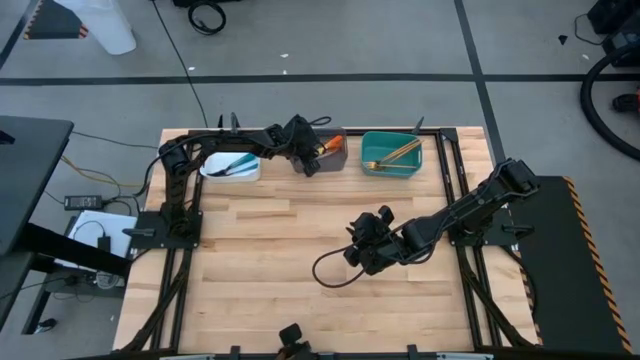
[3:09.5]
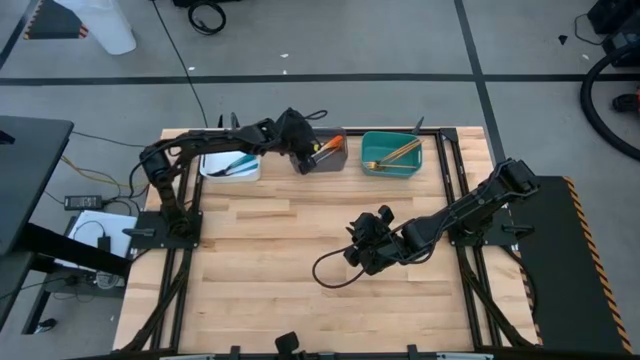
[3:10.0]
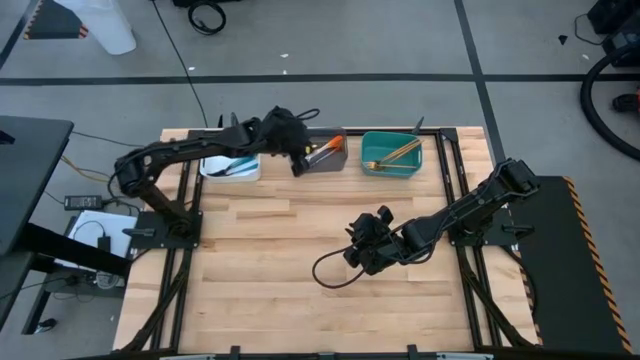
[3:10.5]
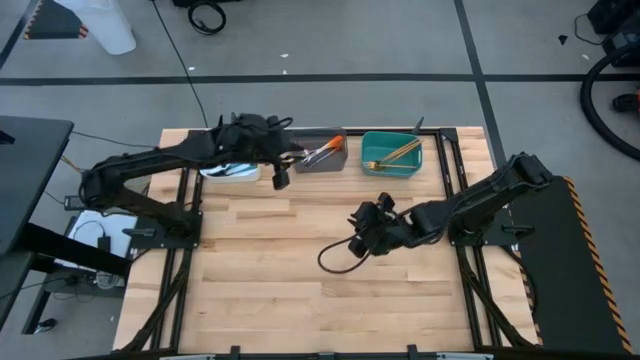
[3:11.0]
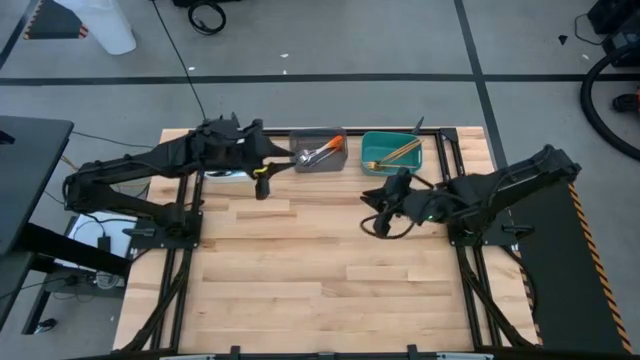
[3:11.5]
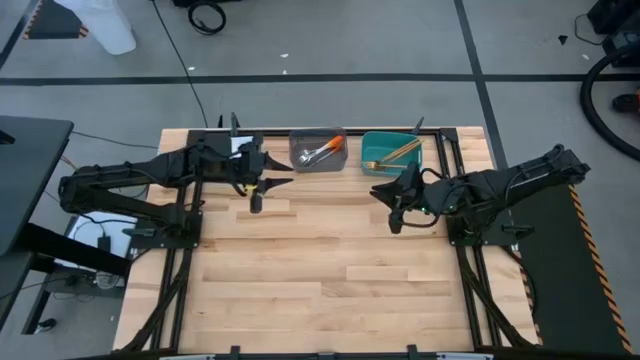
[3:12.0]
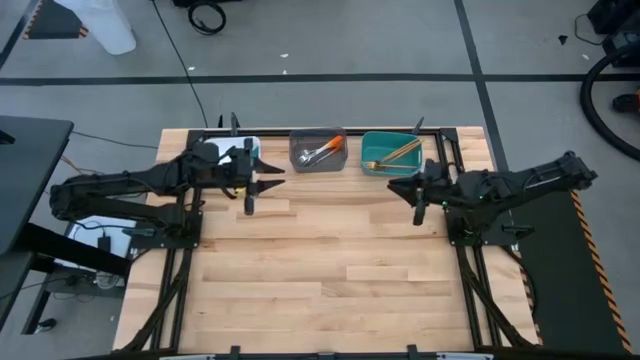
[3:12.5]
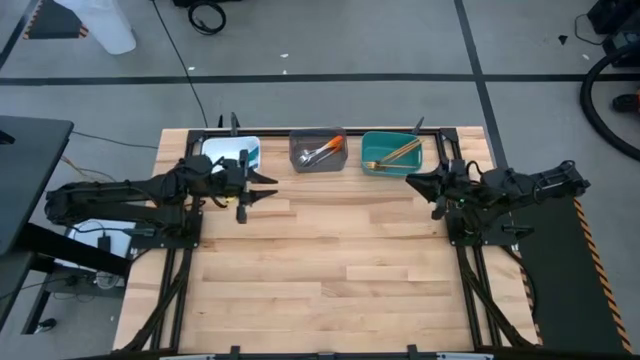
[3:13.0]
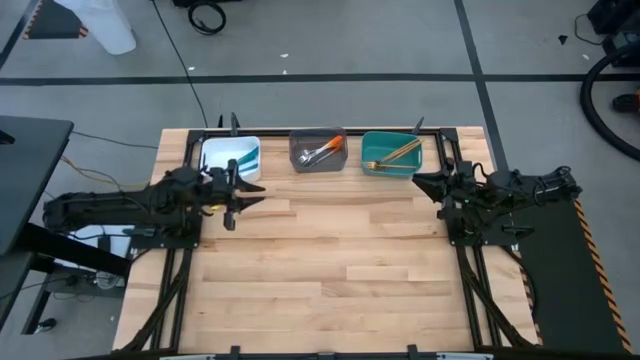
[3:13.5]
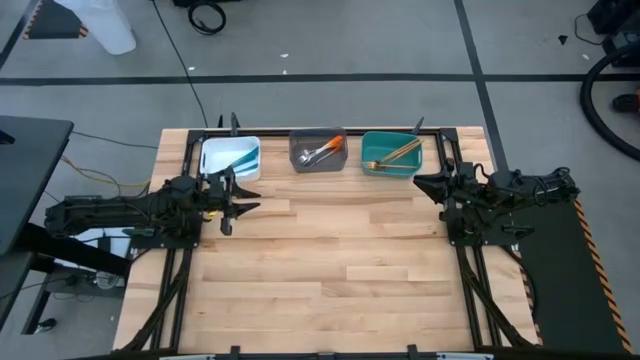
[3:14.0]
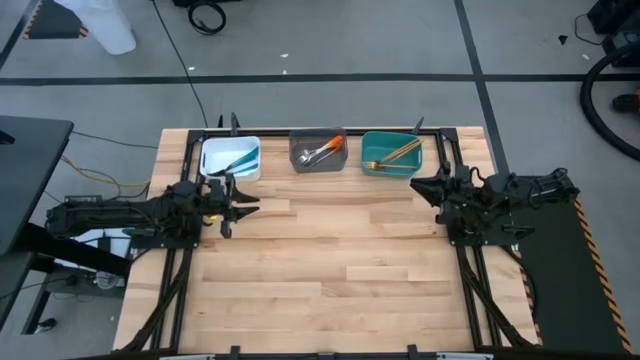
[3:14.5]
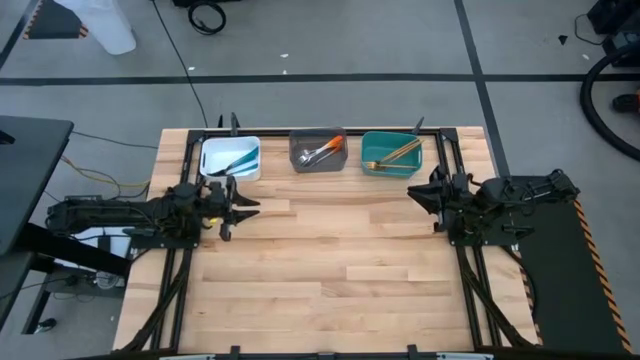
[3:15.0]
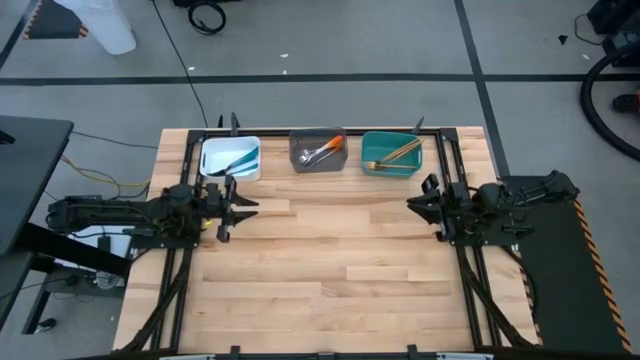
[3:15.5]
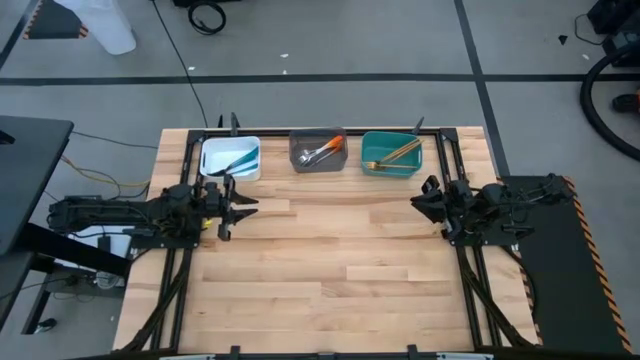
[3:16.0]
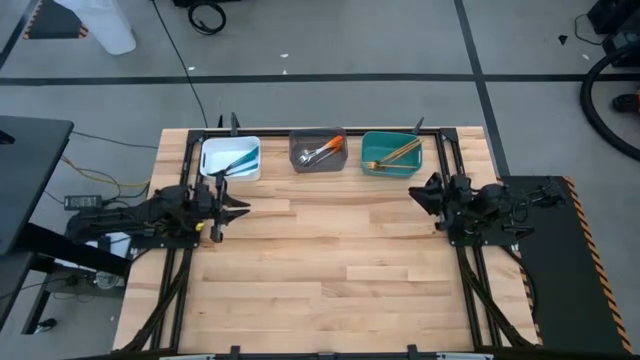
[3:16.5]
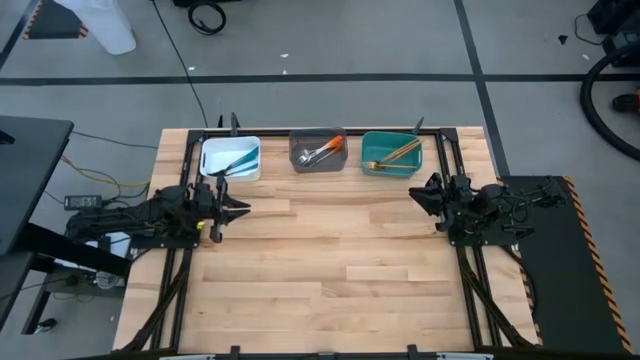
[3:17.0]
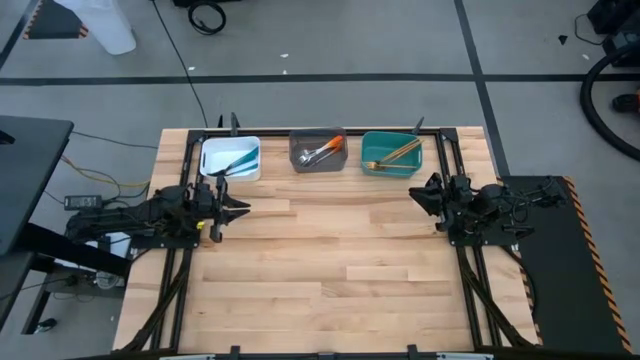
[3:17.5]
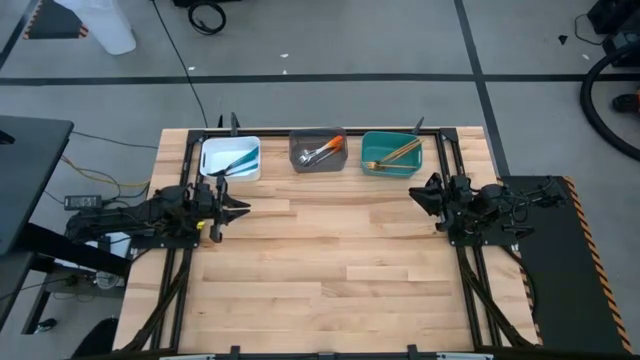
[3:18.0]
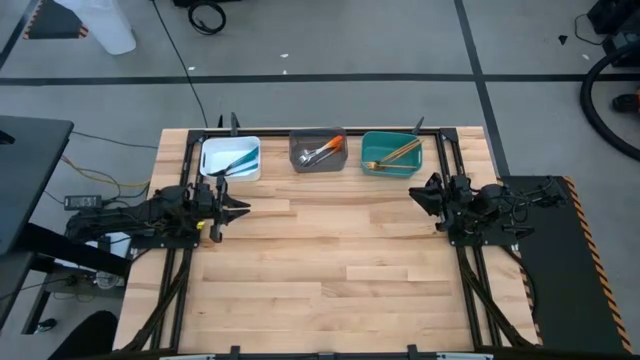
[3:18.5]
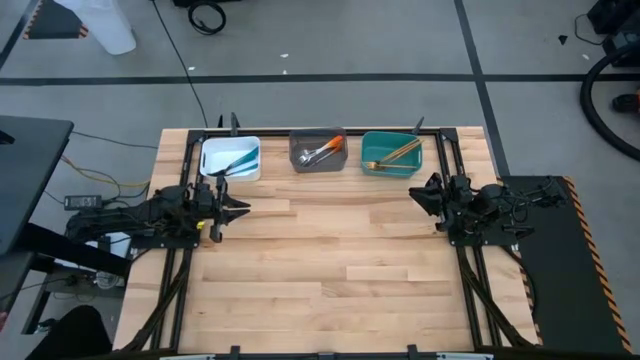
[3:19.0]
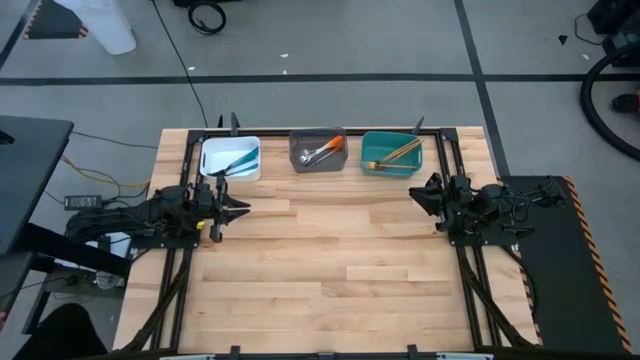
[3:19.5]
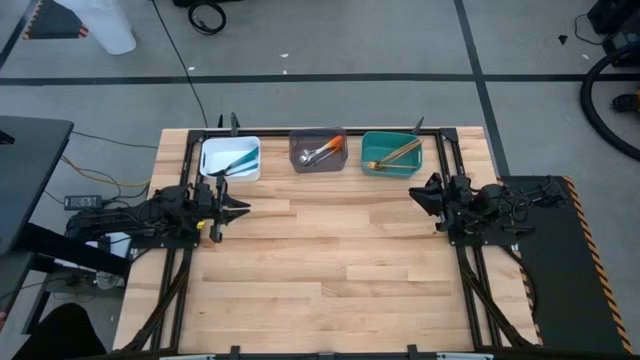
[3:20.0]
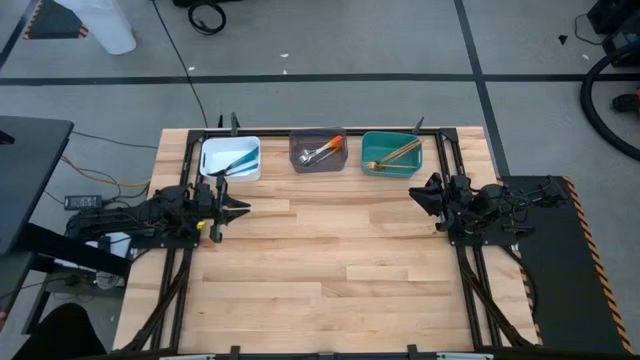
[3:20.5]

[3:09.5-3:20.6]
Task: Sort silverware by color (type)
Return to Home Position

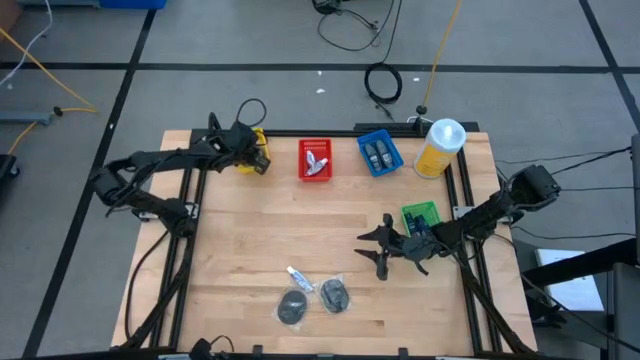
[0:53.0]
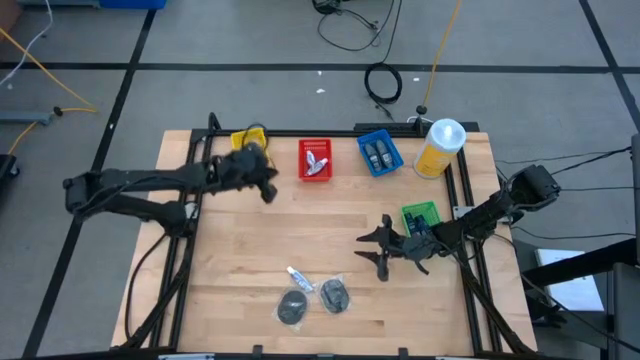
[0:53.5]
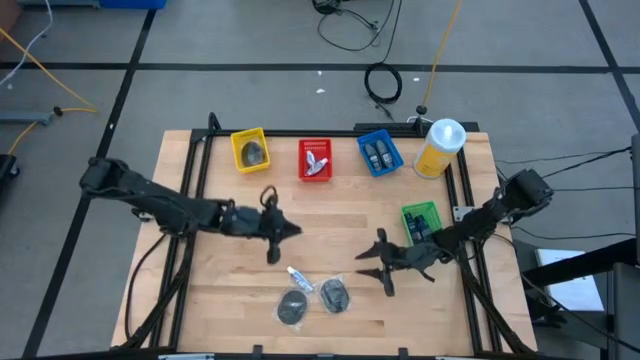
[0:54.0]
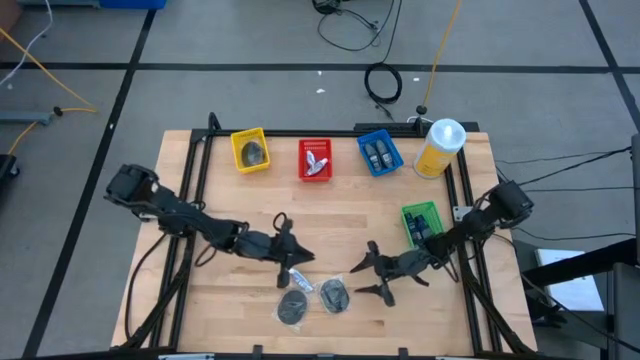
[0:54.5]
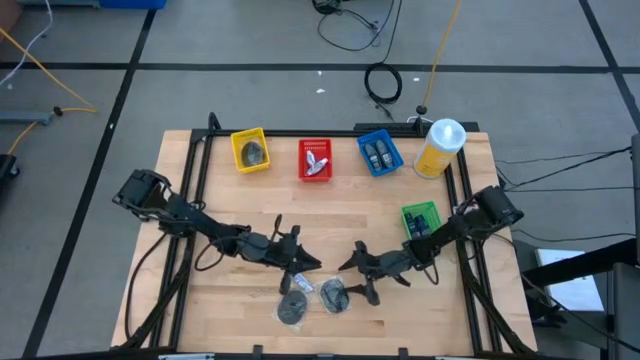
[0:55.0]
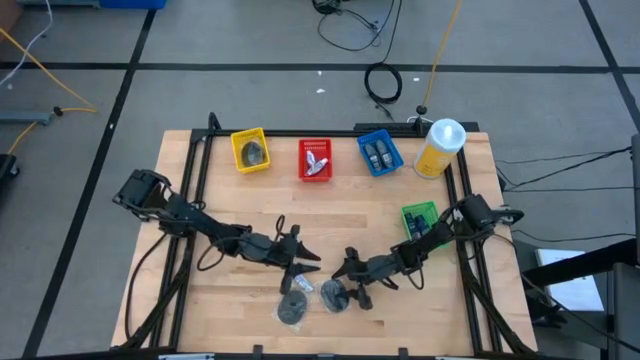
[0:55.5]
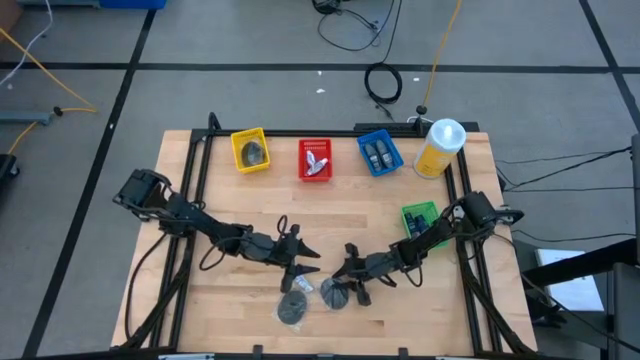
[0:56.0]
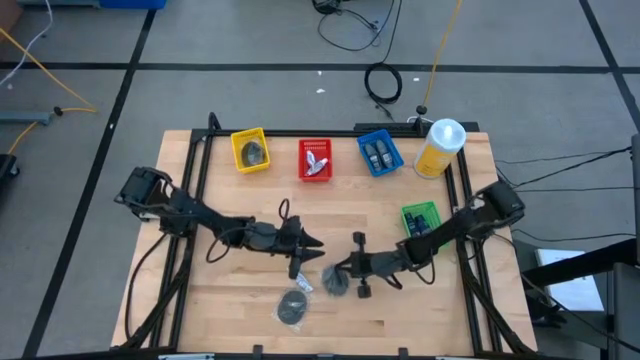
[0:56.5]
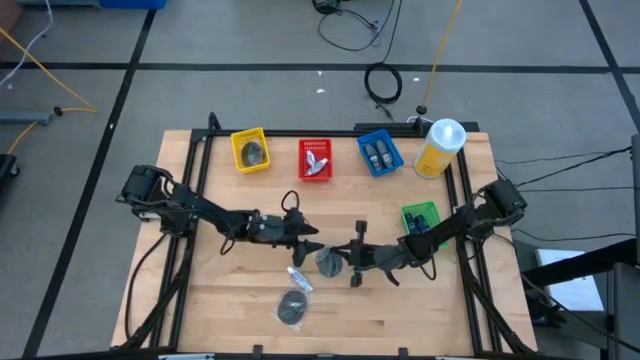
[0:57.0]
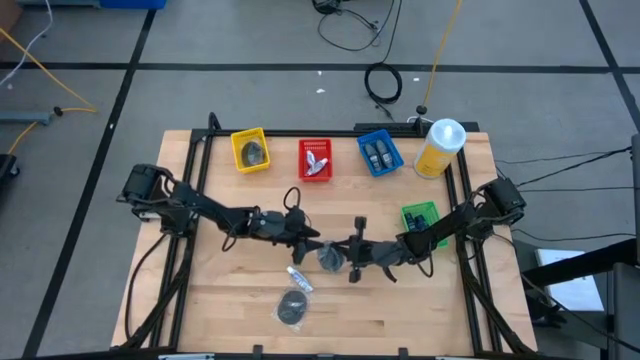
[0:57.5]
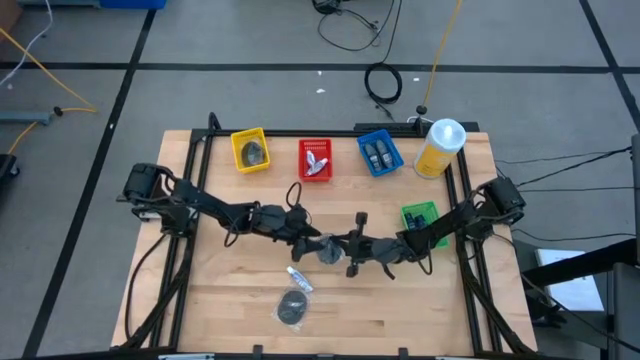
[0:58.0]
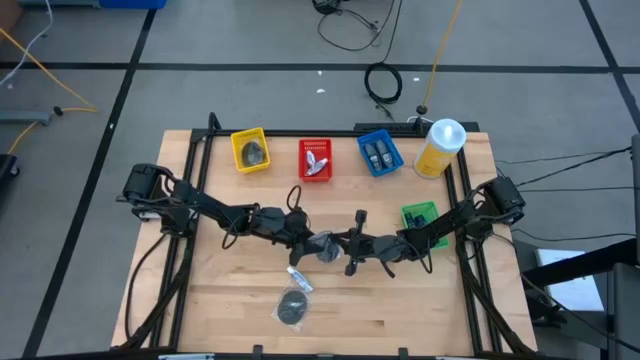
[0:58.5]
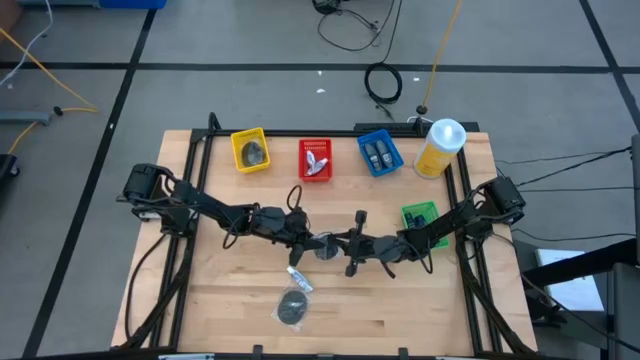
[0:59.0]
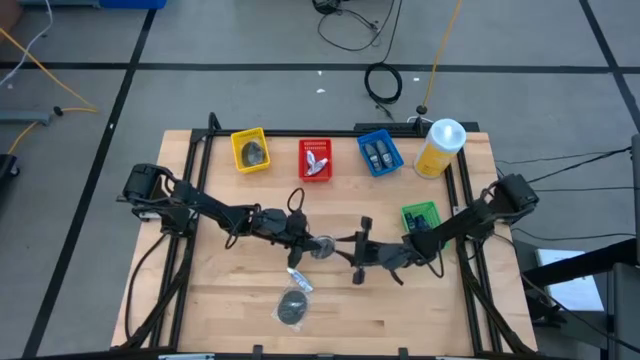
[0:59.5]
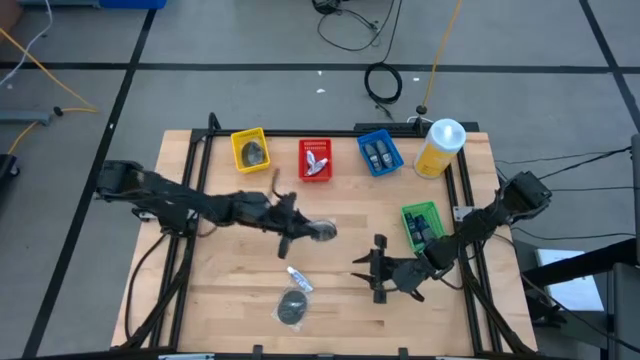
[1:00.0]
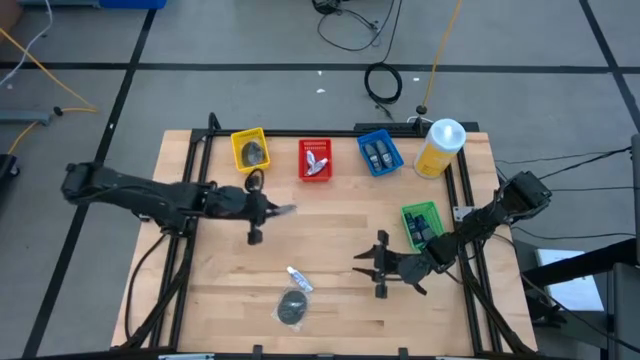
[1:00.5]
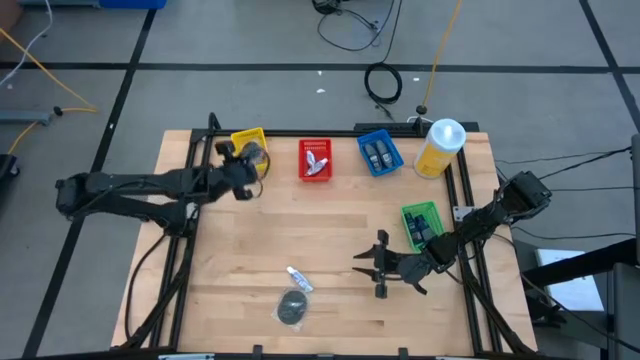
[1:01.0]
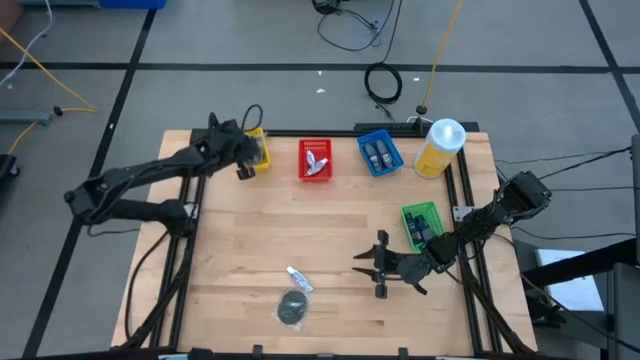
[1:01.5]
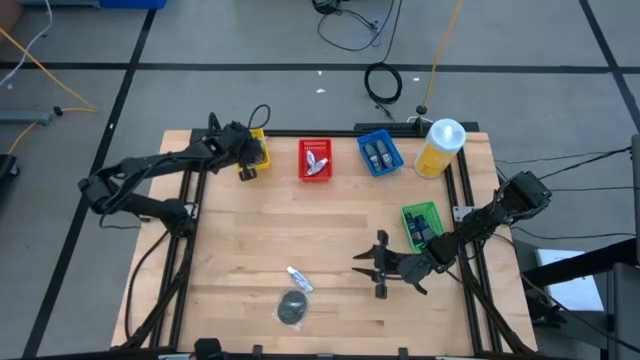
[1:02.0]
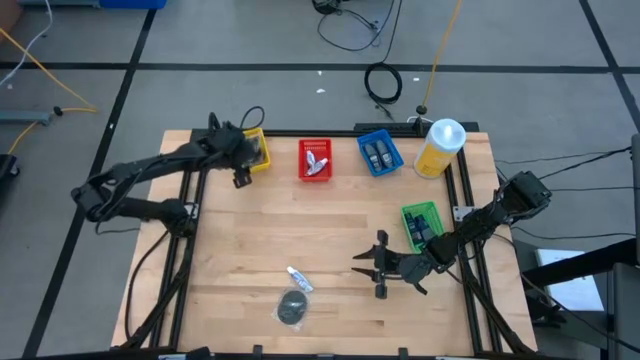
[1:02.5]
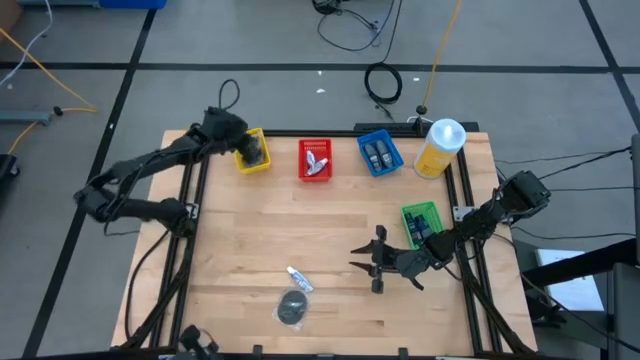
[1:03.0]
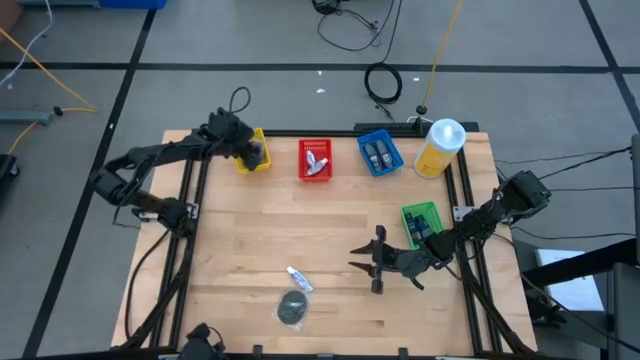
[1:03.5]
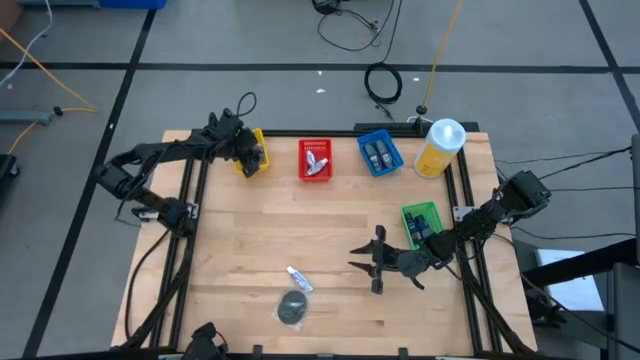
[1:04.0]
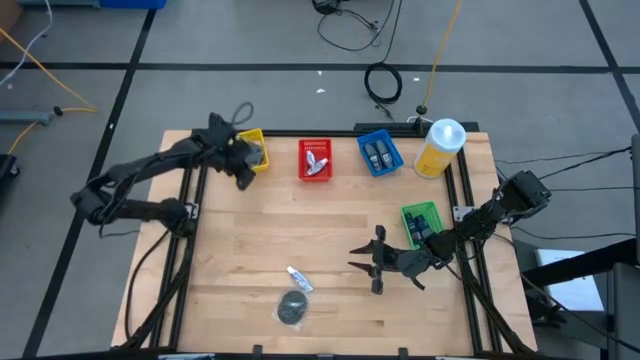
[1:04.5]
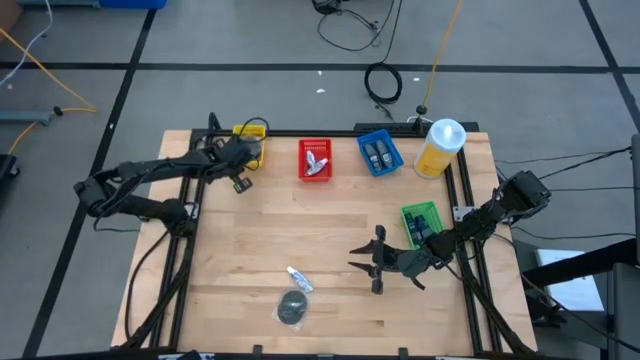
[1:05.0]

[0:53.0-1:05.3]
Task: Pick & Place Travel size toiletries
Put the black hairbrush into the yellow bin
